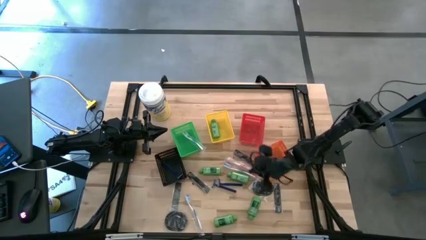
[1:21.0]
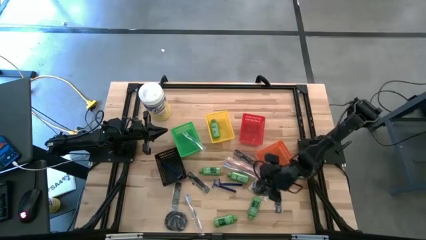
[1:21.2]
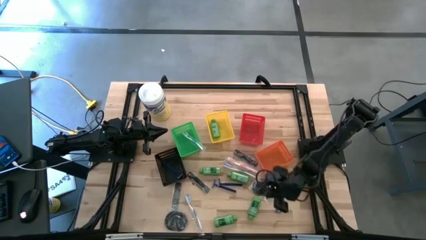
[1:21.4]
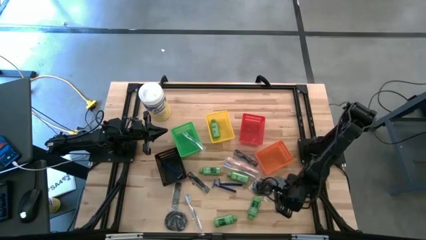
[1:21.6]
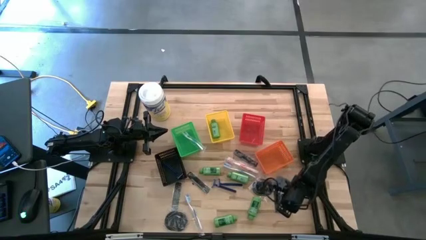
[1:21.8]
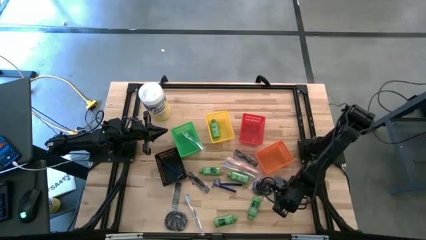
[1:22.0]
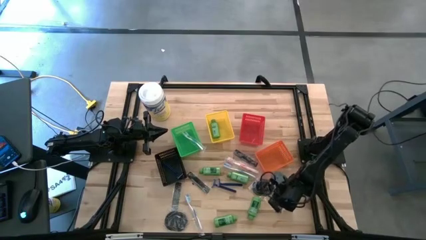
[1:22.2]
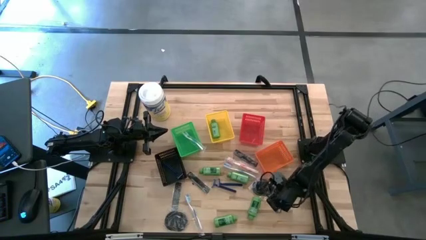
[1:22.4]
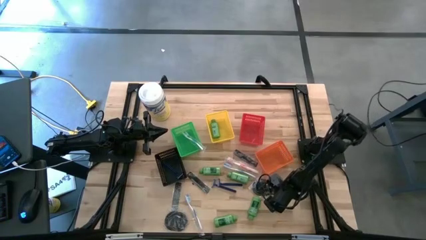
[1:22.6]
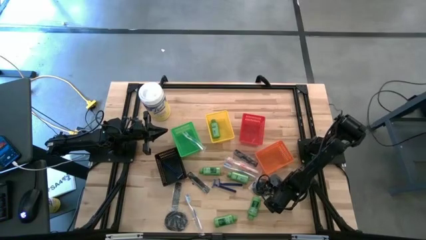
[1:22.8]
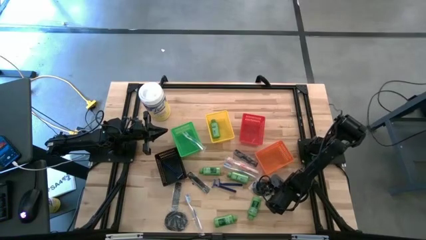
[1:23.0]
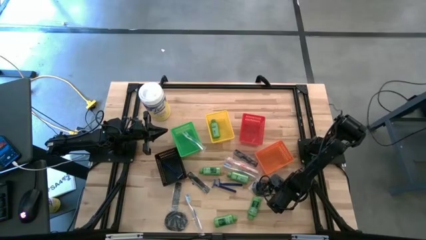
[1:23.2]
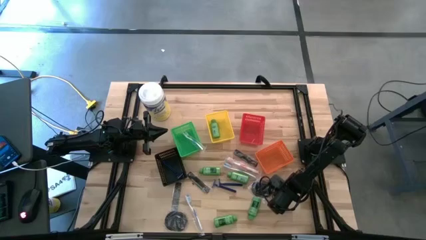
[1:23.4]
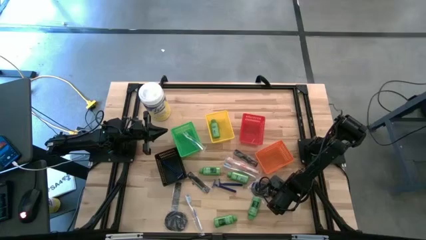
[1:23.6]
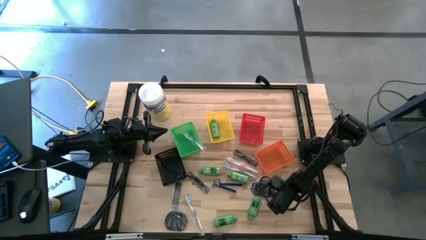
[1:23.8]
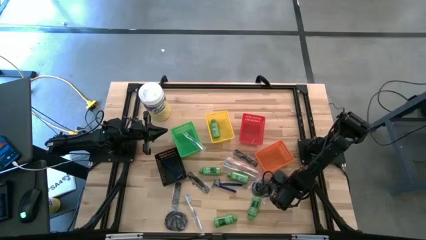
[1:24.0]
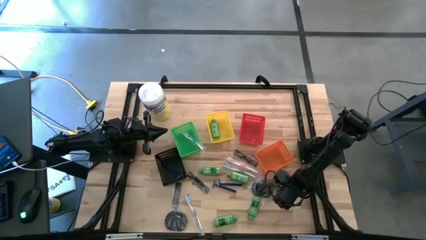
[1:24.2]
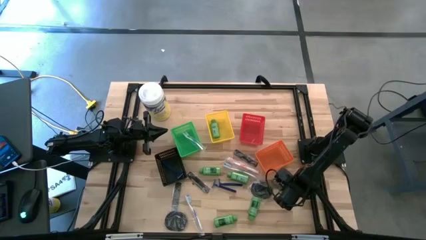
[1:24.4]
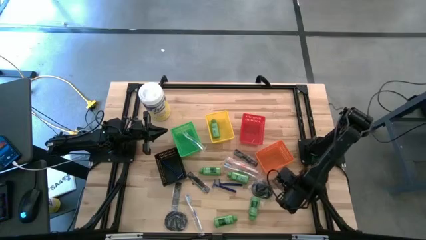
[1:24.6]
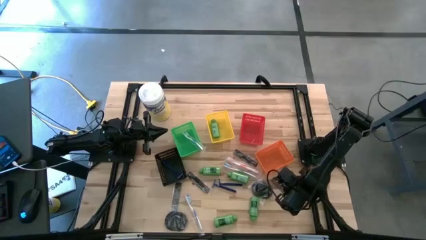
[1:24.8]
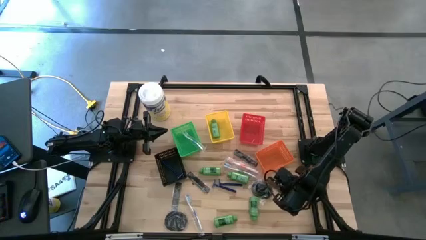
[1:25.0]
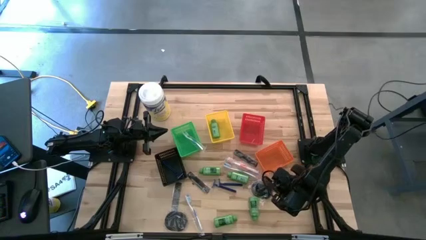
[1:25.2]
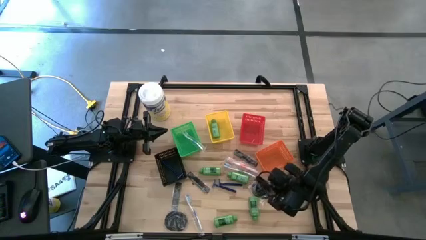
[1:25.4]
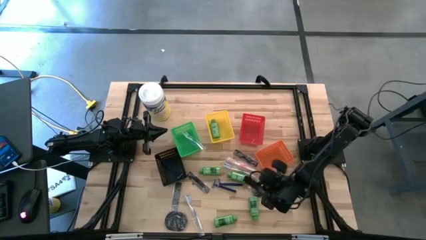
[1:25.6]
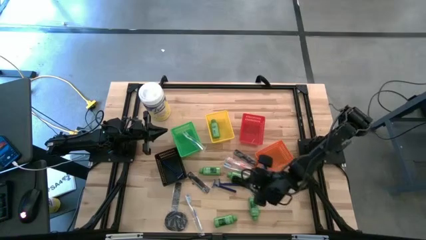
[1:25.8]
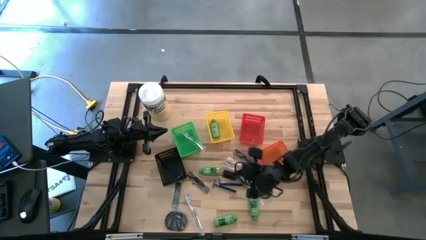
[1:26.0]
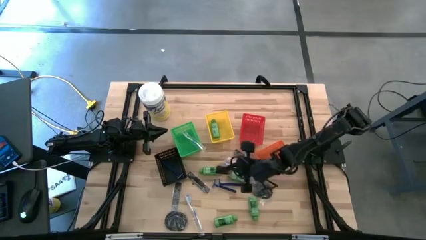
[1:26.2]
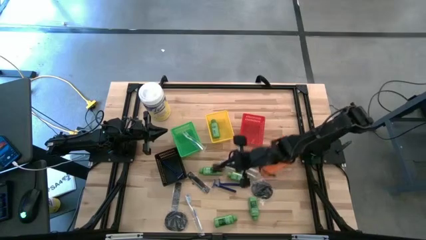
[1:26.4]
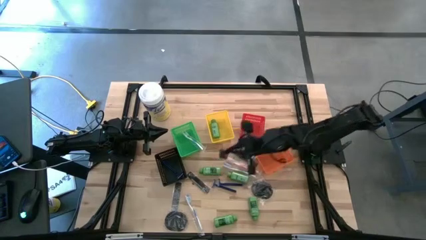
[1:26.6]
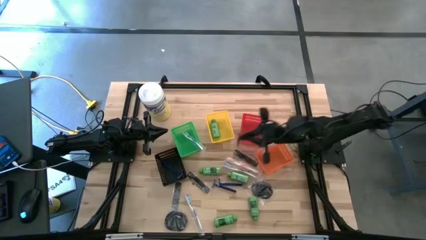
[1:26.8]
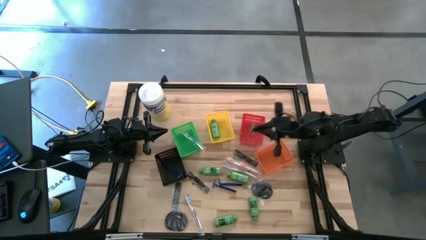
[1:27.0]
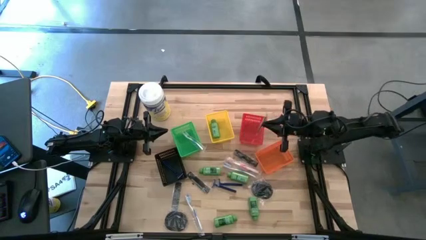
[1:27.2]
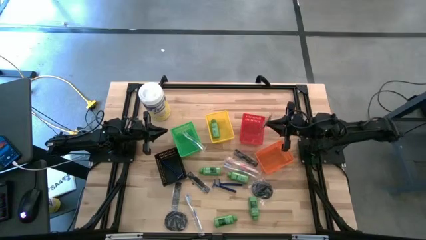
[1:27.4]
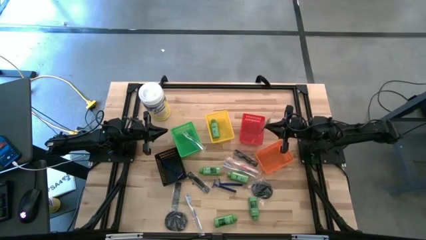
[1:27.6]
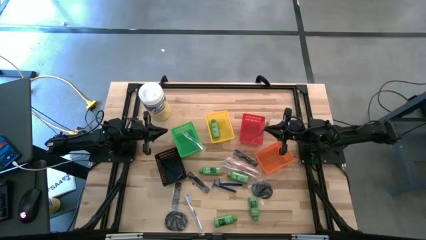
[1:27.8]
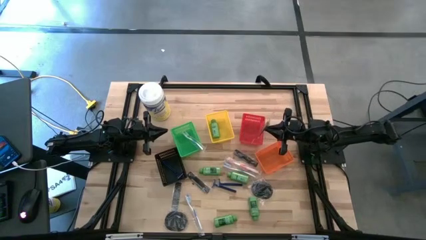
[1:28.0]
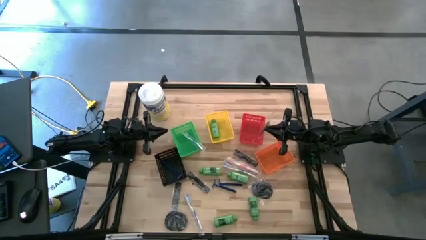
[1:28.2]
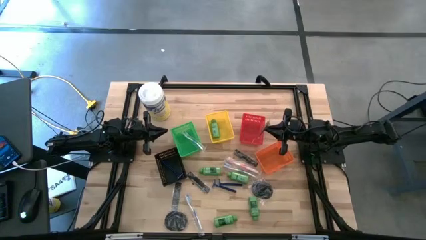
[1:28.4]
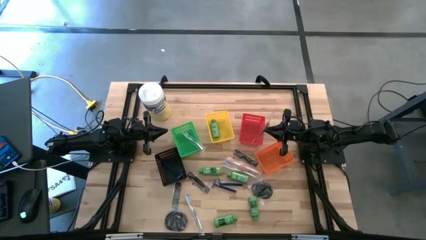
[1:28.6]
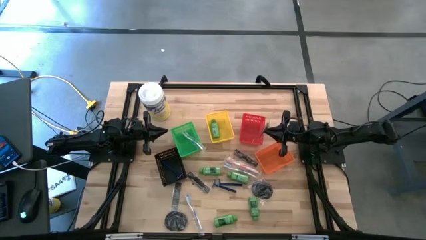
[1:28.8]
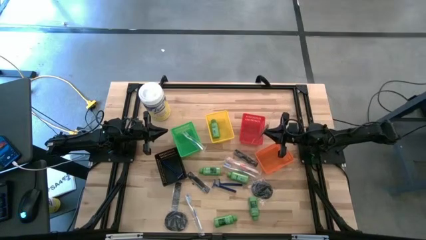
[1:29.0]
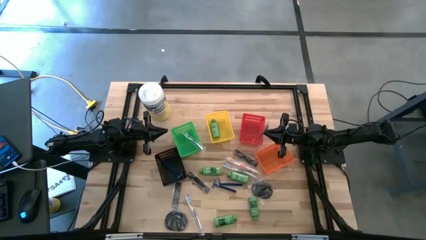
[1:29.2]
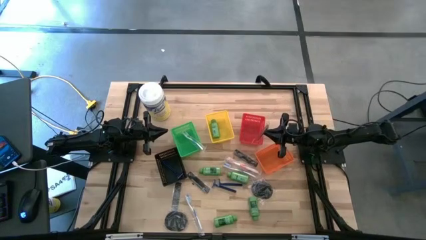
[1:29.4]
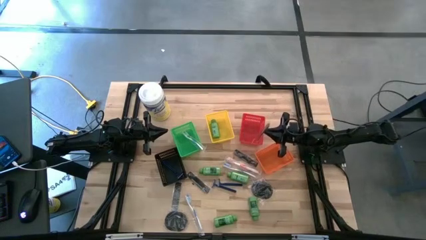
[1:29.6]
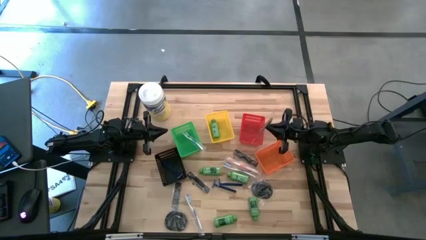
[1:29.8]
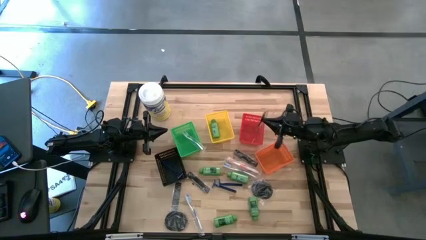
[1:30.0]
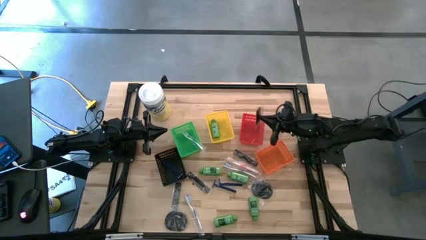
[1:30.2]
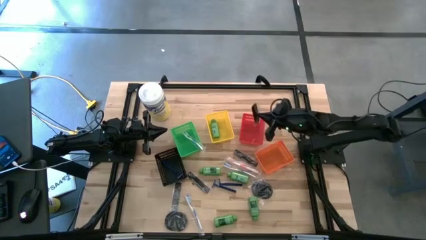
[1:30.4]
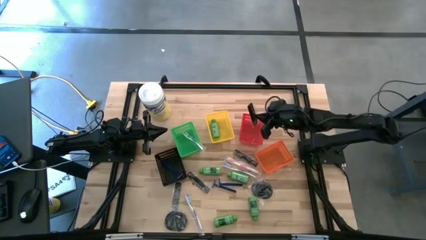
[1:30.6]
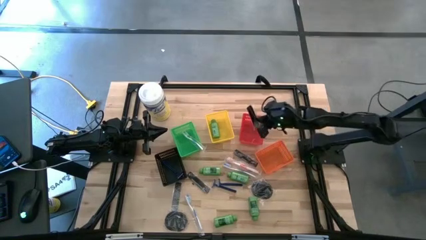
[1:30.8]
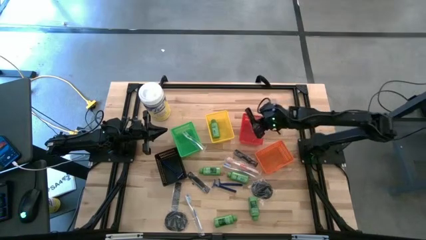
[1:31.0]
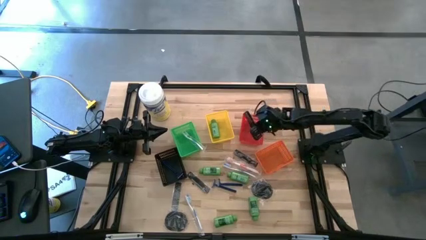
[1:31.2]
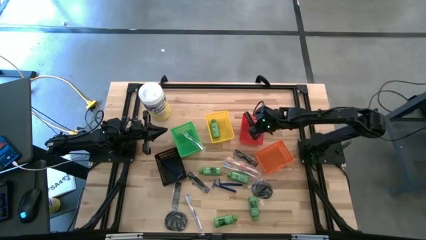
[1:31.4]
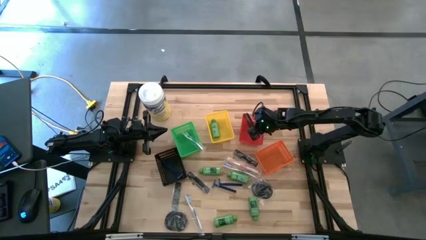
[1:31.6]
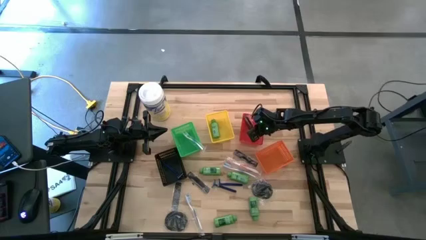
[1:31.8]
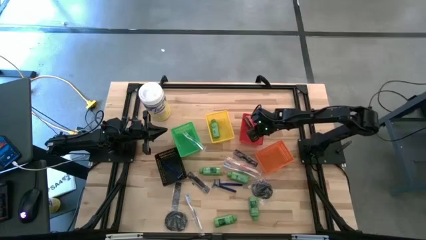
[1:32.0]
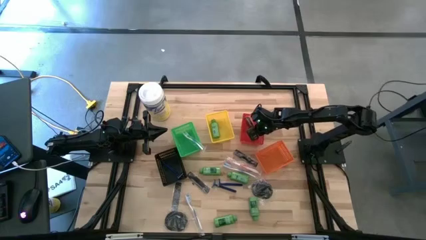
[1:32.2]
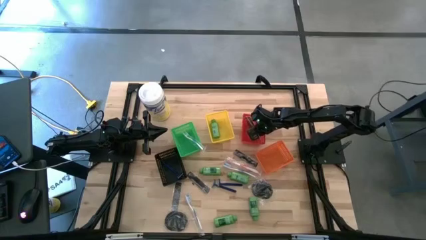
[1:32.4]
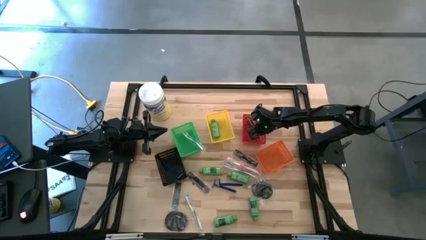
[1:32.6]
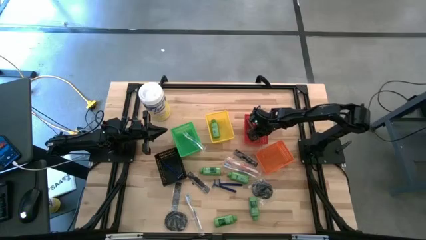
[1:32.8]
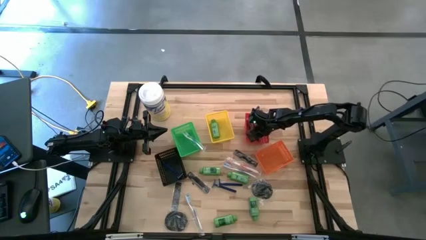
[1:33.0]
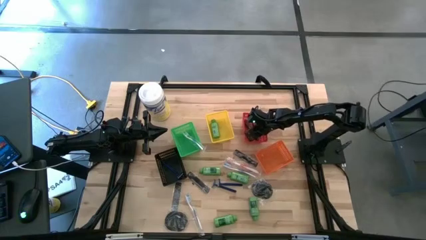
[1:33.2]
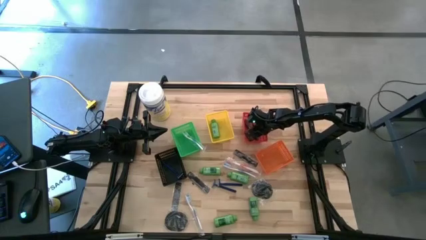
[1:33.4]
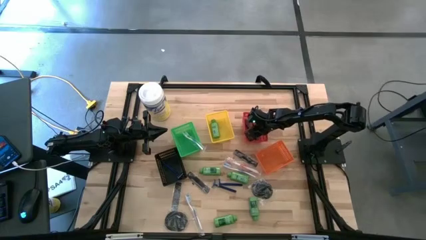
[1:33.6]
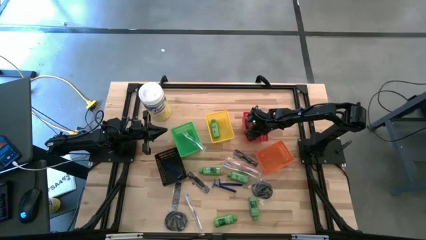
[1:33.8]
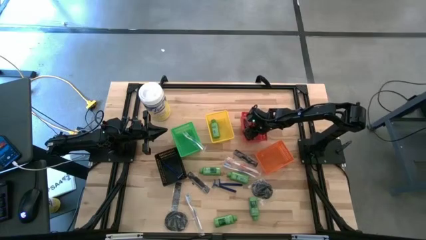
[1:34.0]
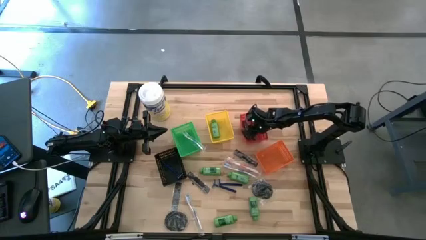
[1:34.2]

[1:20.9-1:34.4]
Task: Pick & Place Travel size toiletries
Put the black comb into the red bin

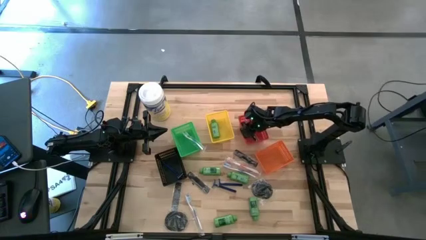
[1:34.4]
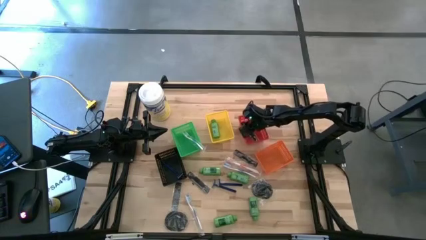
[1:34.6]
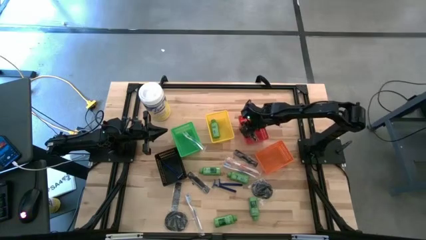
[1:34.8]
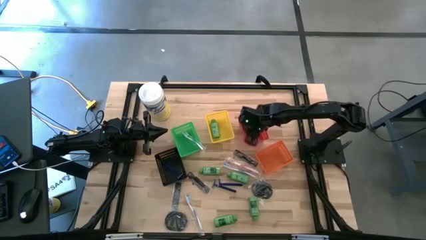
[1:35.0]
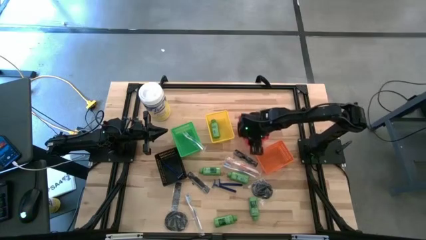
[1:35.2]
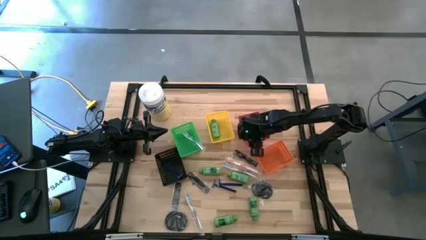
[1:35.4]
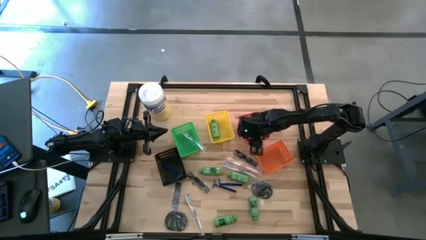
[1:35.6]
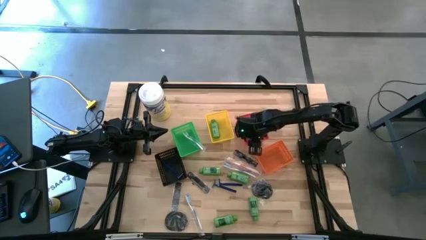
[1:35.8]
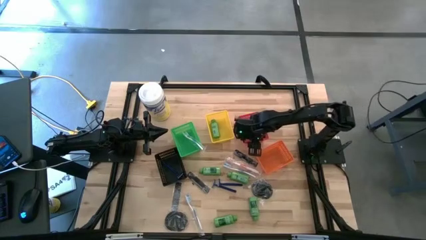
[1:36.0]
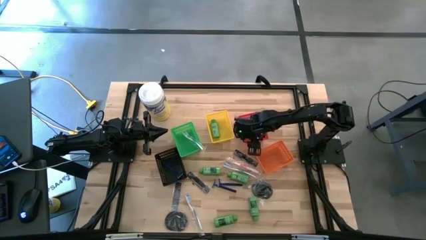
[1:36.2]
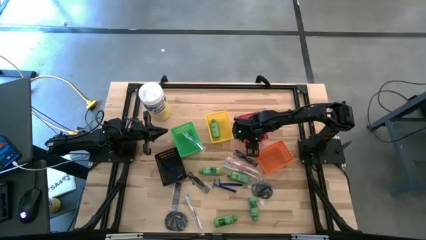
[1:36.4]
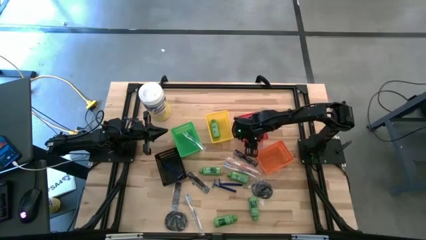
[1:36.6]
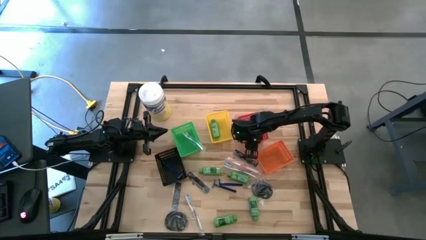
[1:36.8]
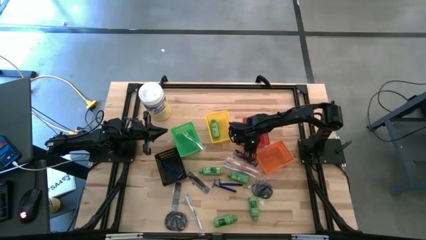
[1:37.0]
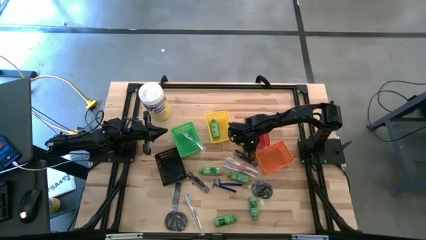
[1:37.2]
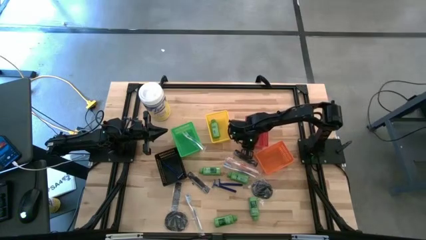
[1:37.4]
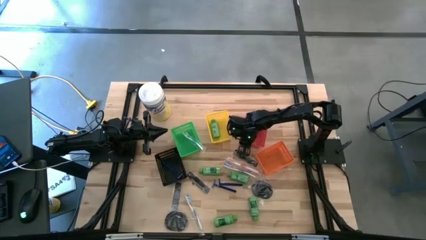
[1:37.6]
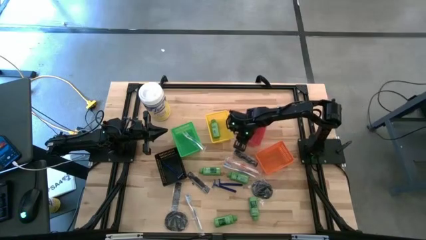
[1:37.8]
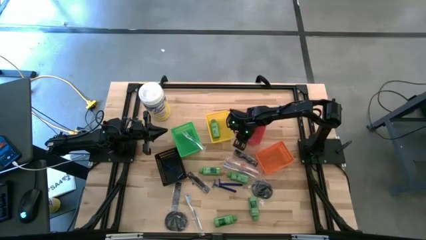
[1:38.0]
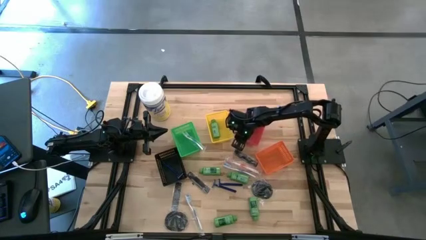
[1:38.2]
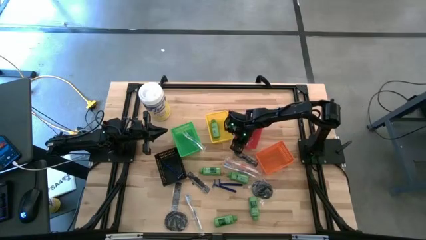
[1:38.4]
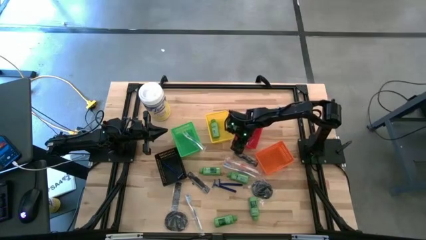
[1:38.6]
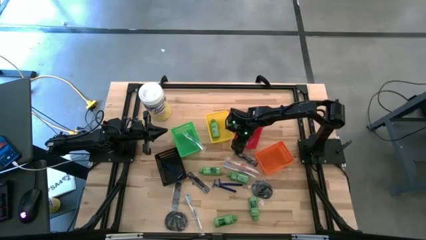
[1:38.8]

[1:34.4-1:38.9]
Adjust the red bin
